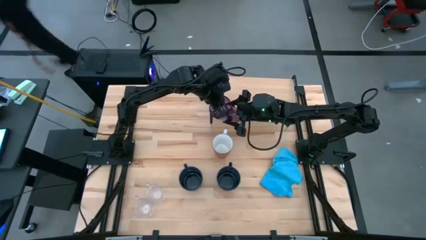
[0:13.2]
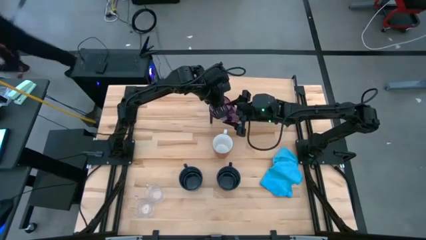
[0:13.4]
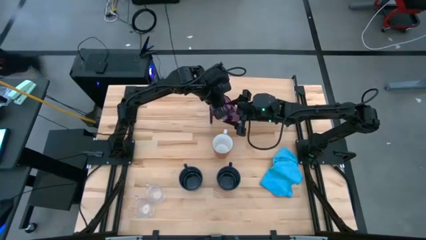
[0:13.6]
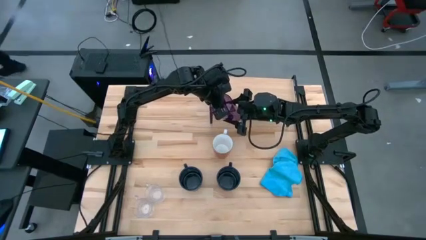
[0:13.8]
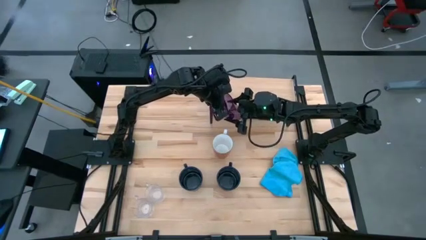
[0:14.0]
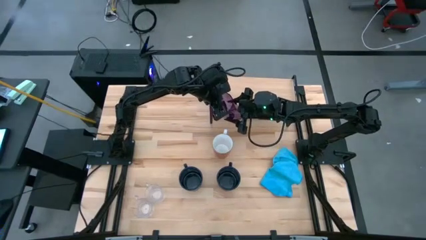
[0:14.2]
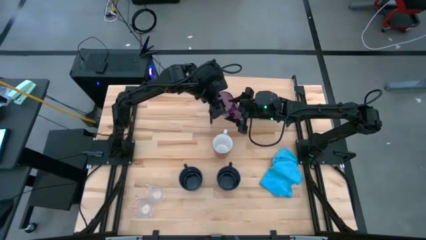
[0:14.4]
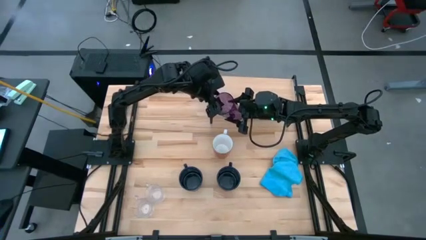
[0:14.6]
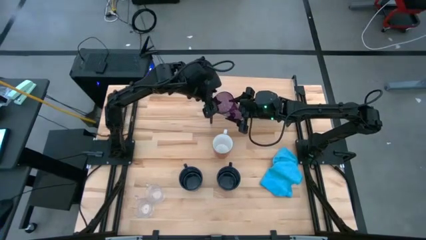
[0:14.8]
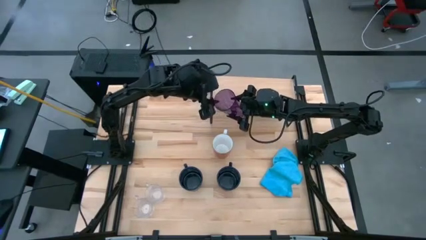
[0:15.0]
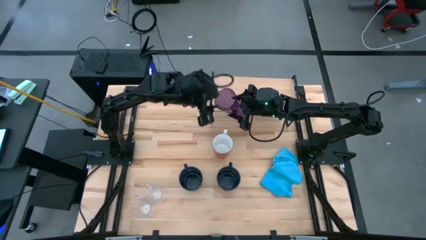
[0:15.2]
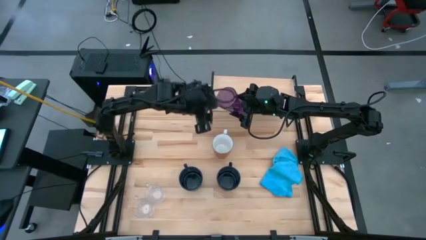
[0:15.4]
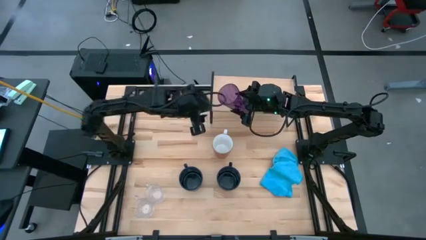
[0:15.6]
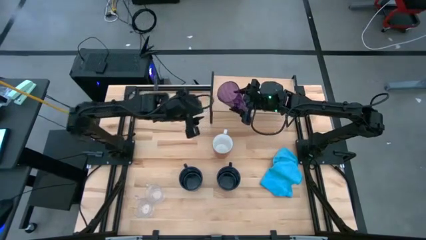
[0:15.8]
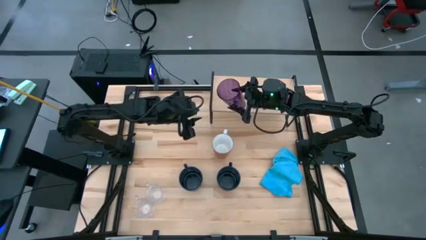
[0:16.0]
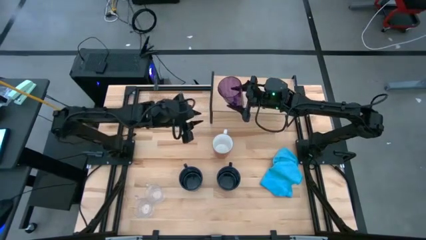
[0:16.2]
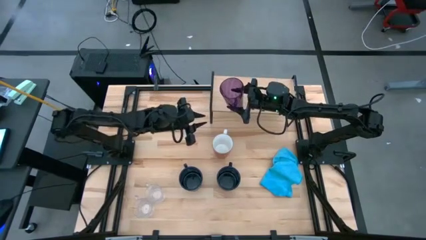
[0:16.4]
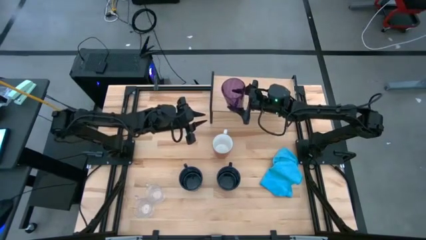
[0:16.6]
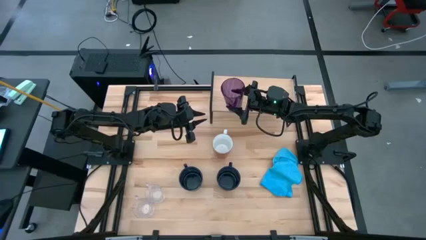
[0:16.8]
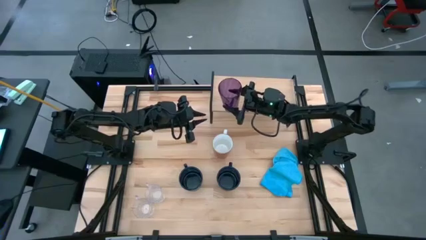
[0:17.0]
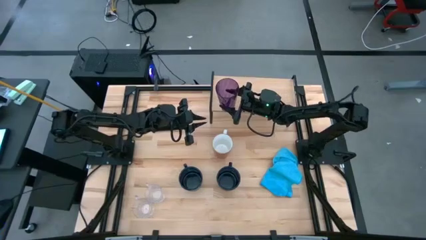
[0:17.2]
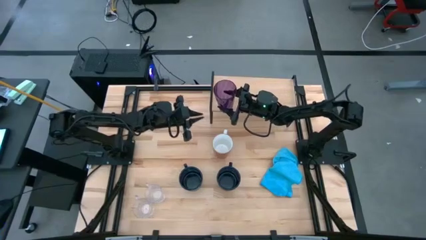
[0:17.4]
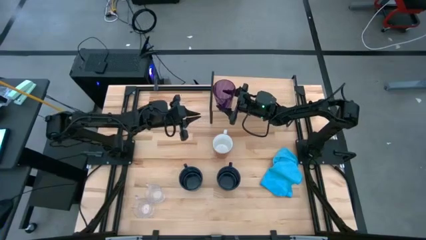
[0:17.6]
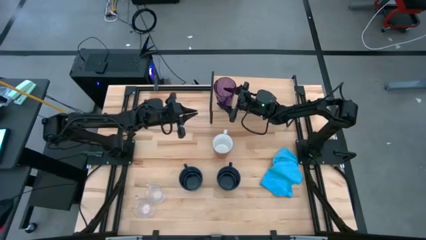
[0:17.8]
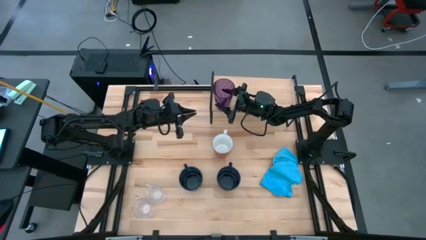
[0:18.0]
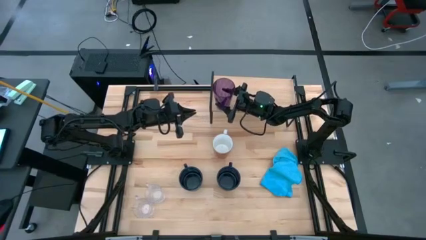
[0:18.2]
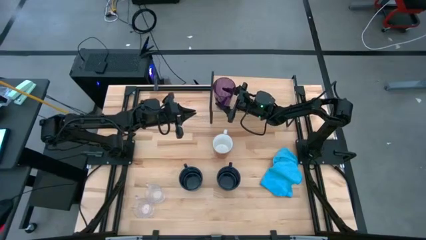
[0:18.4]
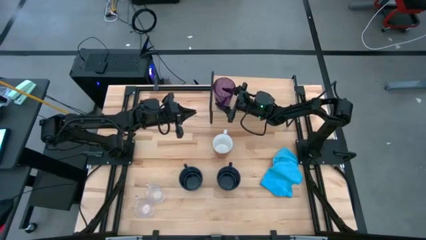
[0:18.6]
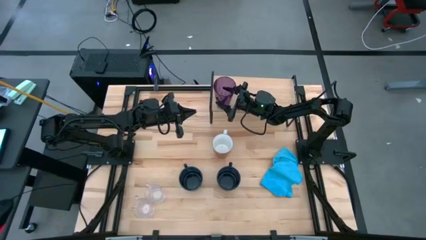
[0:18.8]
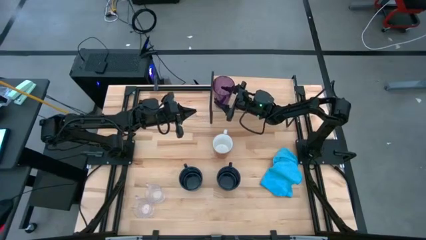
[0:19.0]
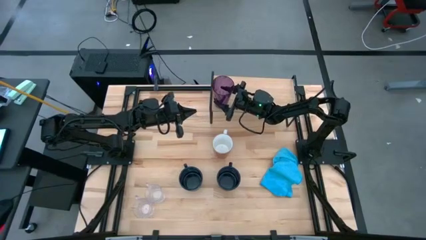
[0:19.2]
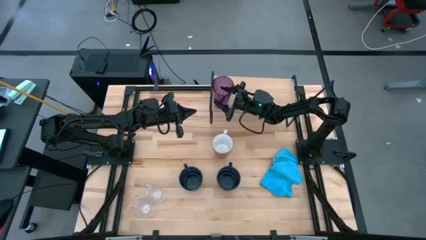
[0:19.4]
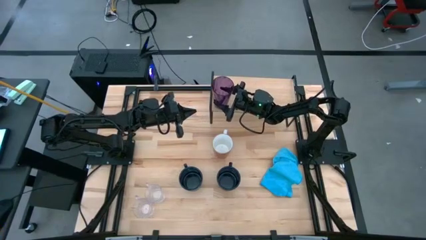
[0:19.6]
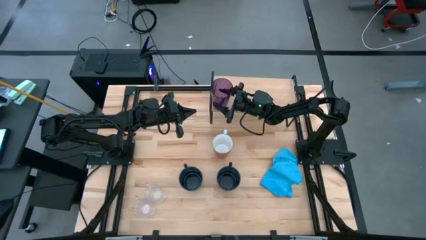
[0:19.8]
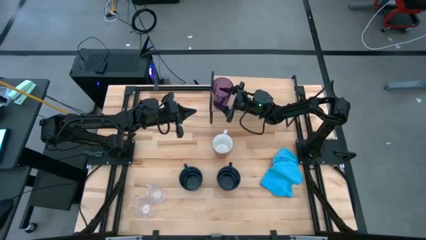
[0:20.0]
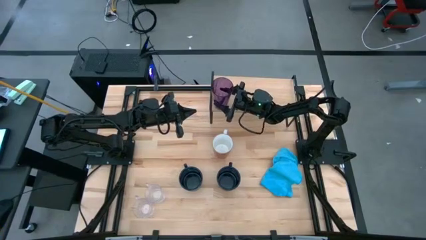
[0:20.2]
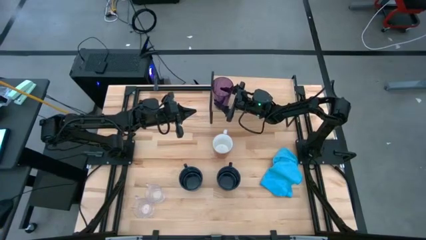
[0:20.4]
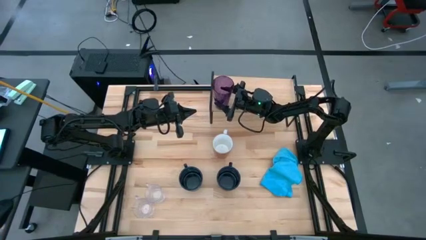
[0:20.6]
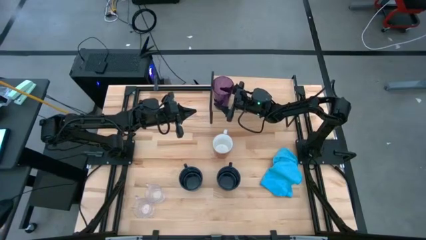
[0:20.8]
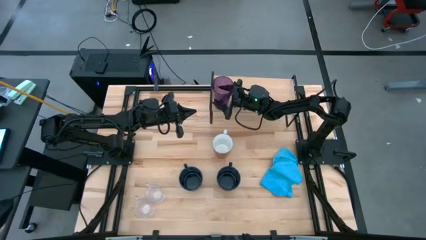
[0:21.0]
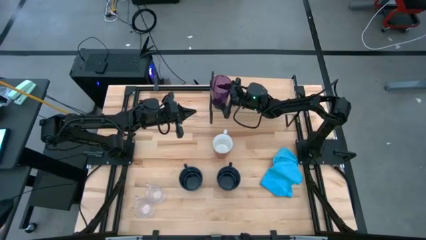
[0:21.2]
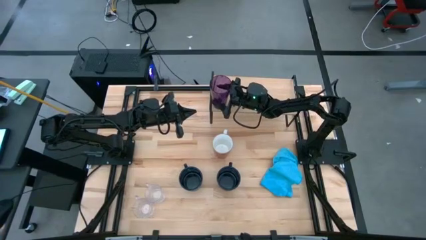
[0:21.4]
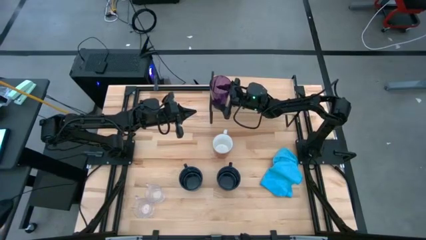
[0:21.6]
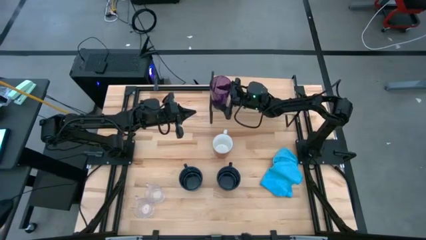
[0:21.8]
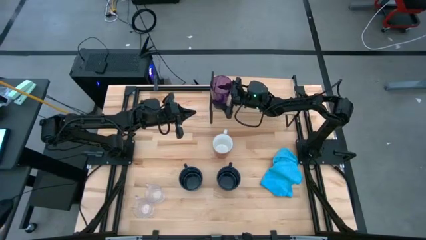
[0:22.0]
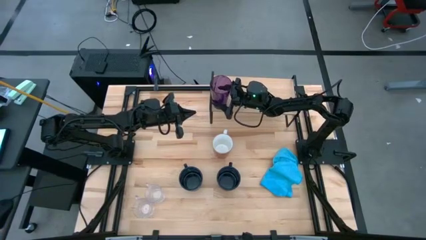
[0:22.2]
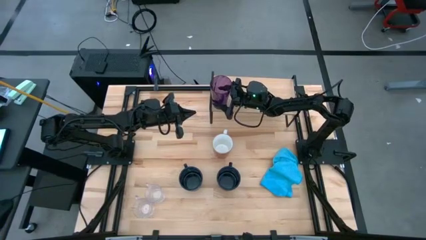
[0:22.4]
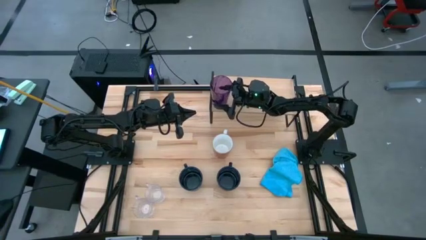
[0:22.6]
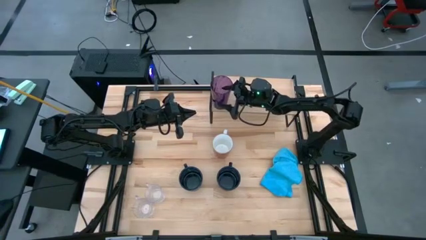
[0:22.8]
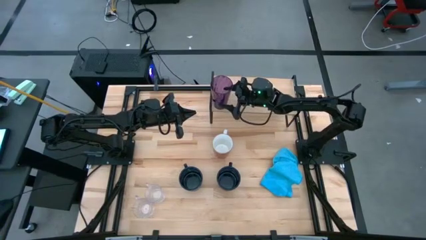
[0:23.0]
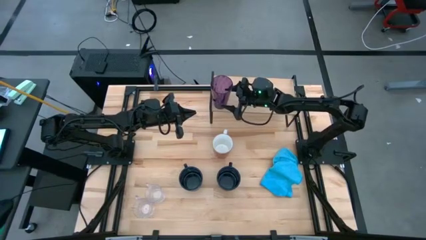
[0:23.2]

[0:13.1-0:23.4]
Task: Stack small to large cups/mugs on shelf
Put the purple cup on the shelf

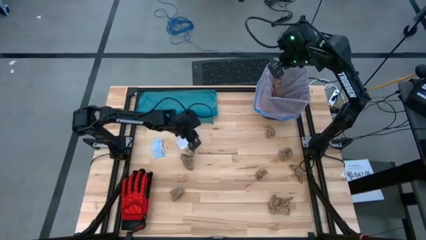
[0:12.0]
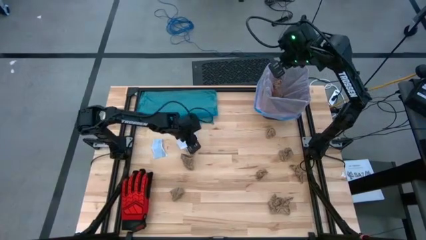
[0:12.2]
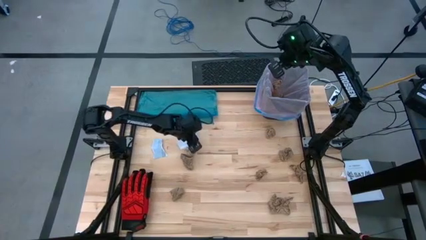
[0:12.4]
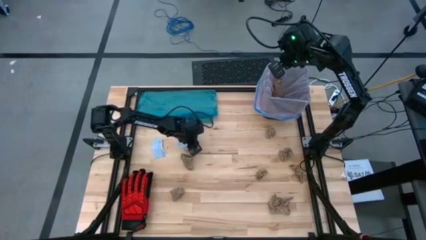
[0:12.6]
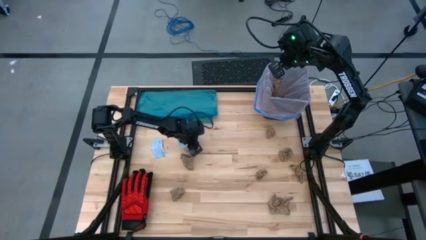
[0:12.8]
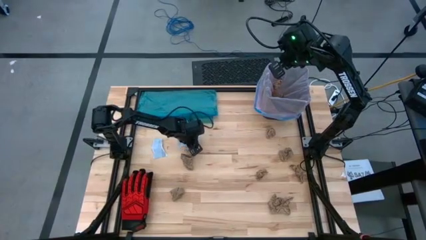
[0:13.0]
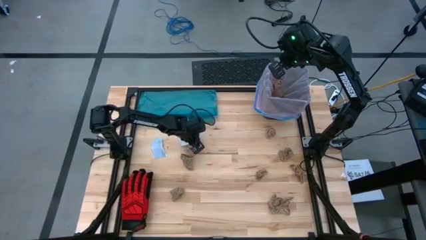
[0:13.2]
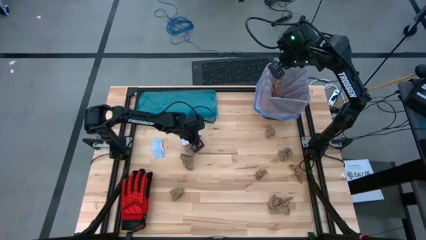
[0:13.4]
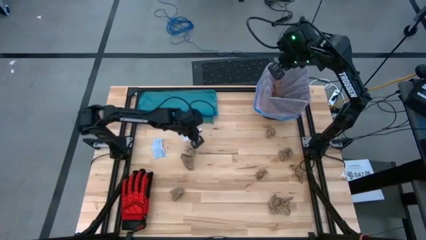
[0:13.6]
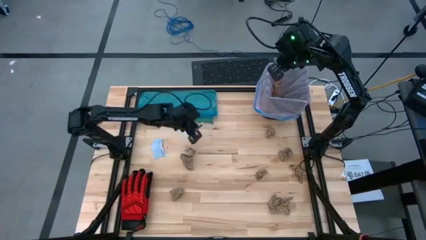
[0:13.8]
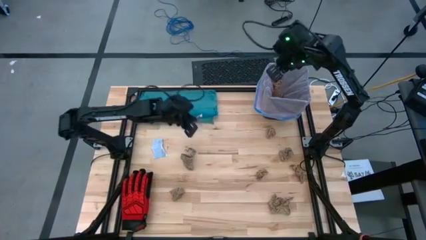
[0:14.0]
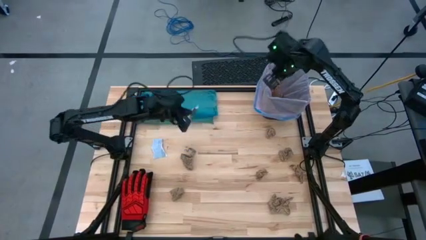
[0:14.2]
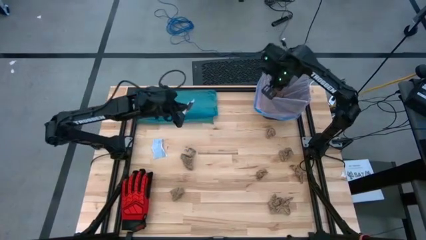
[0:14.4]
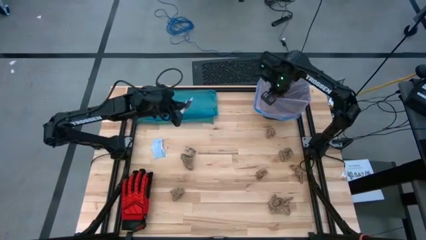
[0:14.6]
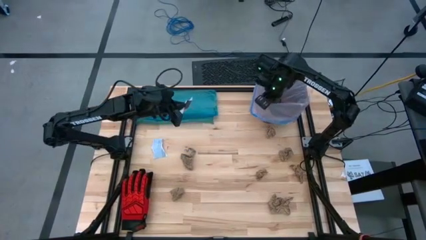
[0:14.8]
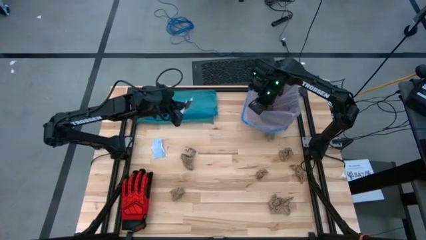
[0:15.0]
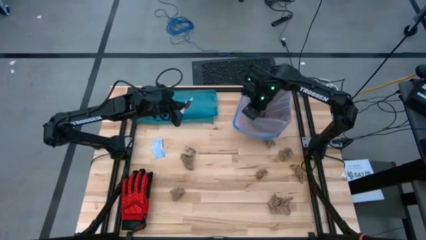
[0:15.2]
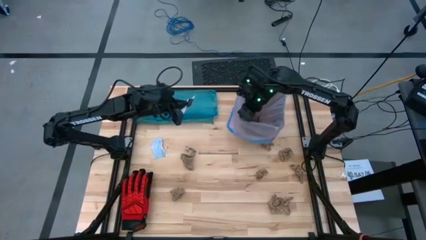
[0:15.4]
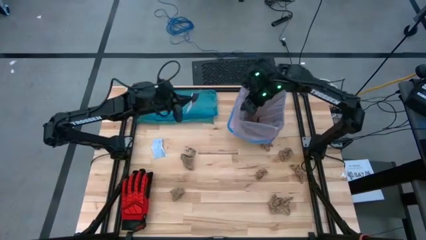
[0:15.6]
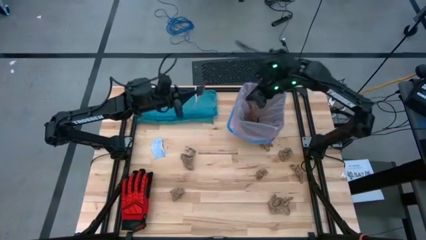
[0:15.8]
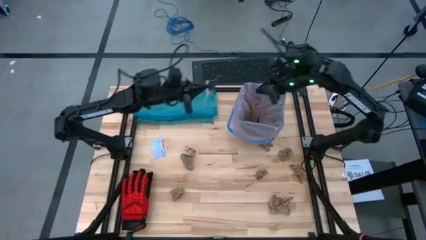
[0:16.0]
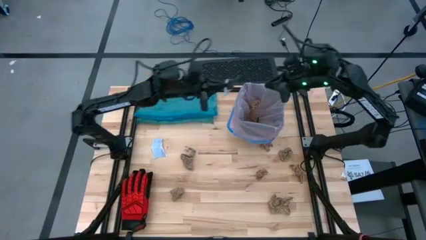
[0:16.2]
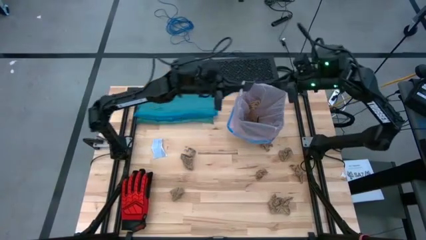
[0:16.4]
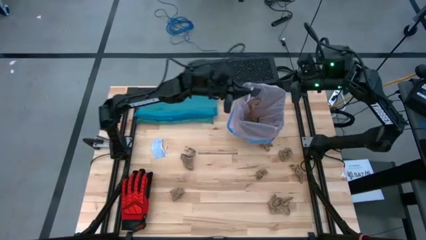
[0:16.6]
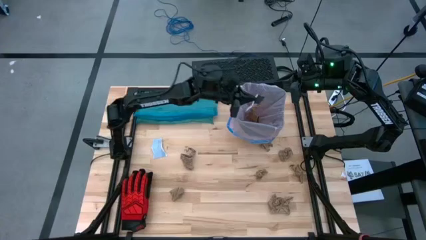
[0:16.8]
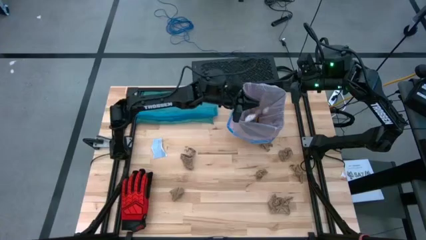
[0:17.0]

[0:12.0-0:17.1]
Task: place trash/remove bag and relplace
Put the white paper into the trash bin

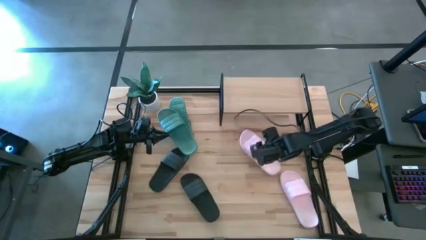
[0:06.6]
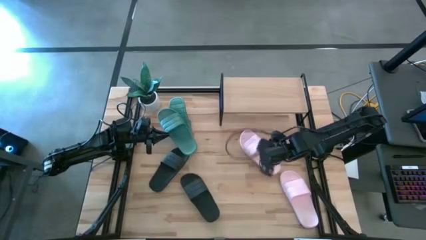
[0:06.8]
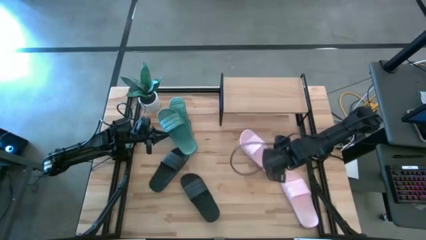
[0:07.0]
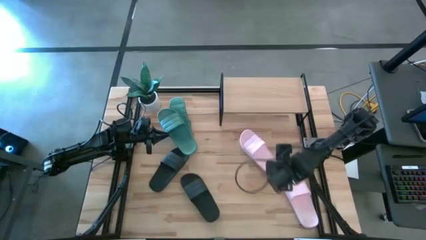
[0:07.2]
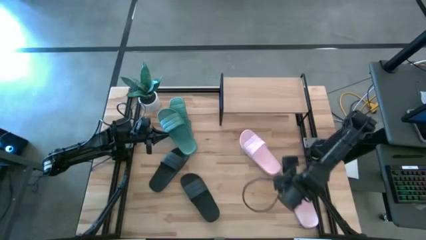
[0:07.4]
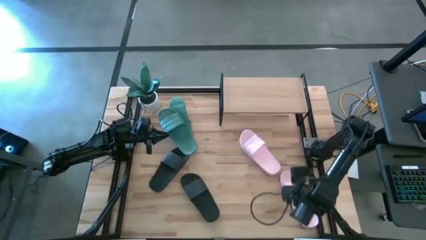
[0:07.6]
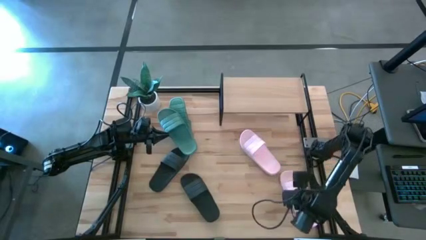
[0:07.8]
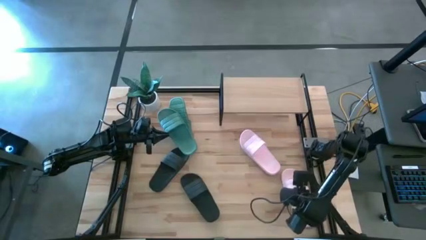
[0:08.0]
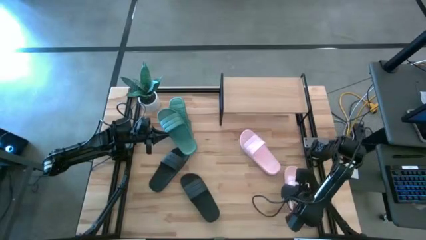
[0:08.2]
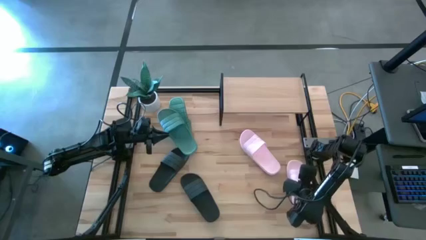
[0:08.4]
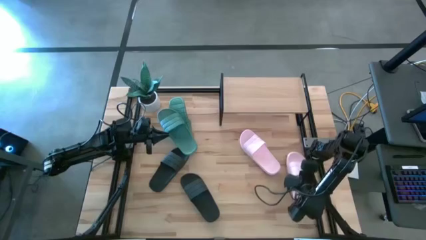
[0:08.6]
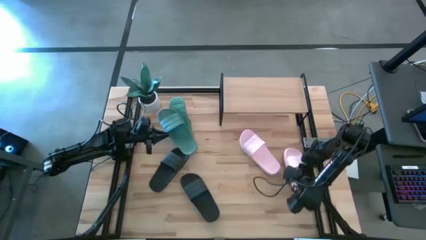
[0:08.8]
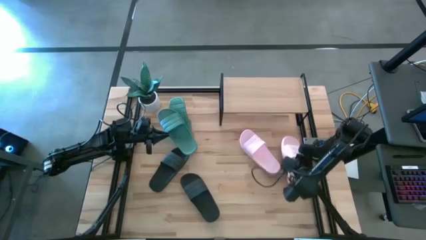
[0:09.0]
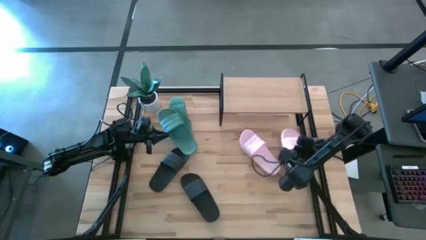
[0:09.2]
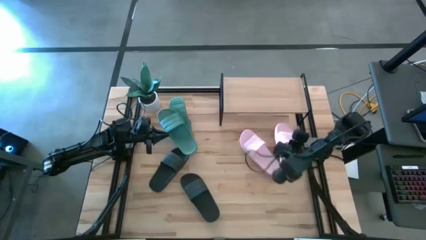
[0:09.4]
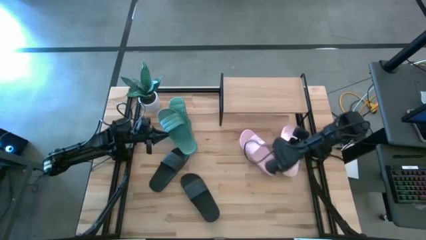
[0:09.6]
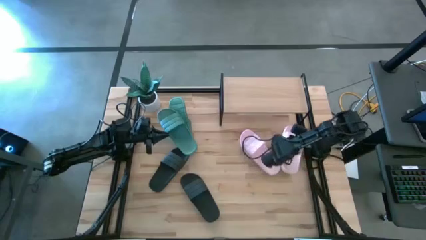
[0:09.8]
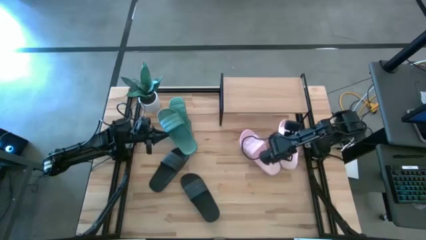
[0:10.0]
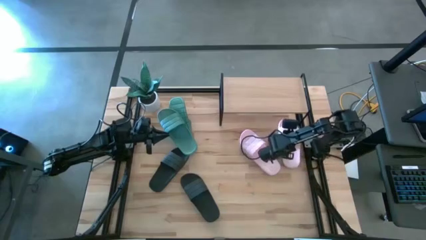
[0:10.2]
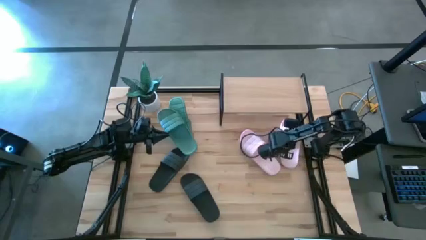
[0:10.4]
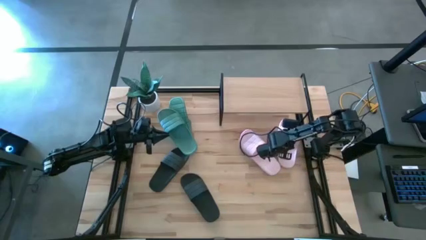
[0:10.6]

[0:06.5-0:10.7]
Task: Pick and place slides into the shelf
Put the pink slide under the shelf
